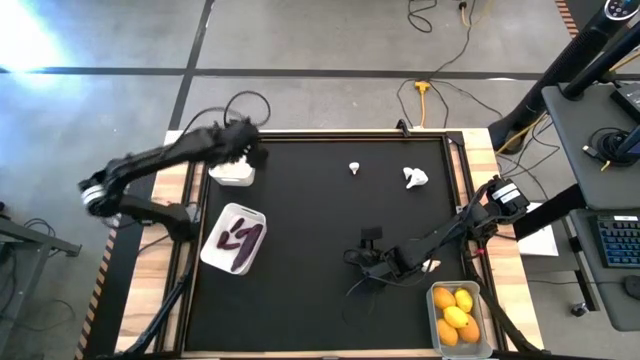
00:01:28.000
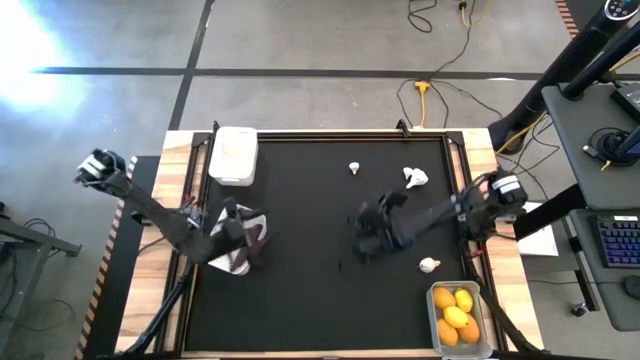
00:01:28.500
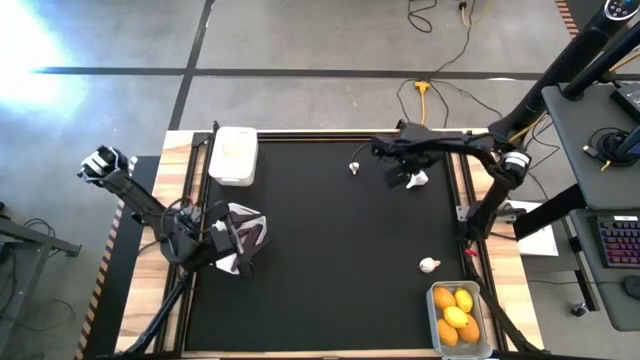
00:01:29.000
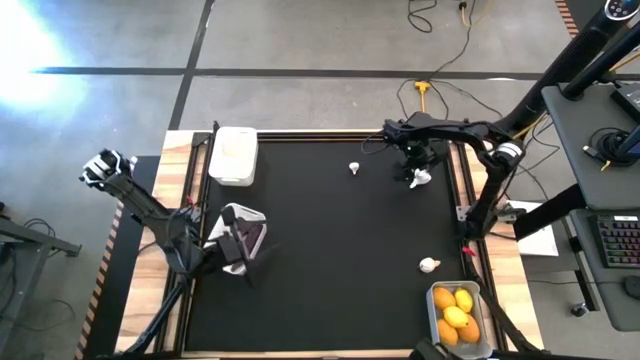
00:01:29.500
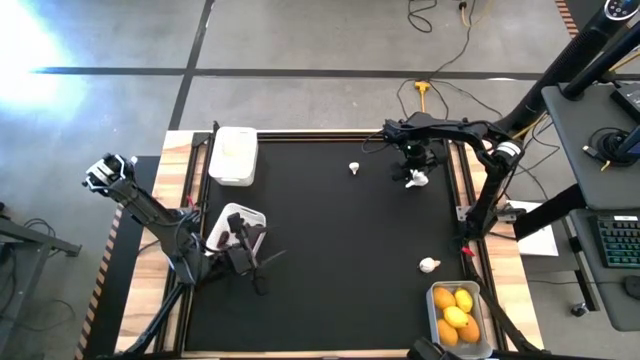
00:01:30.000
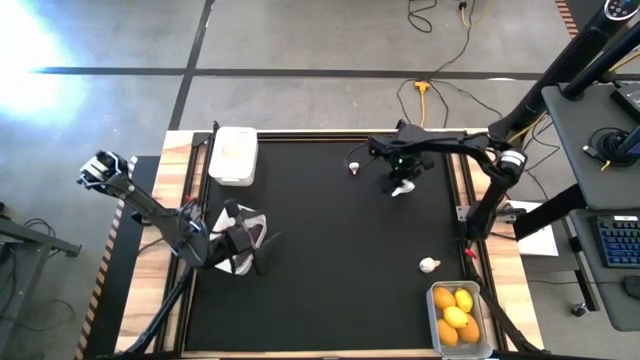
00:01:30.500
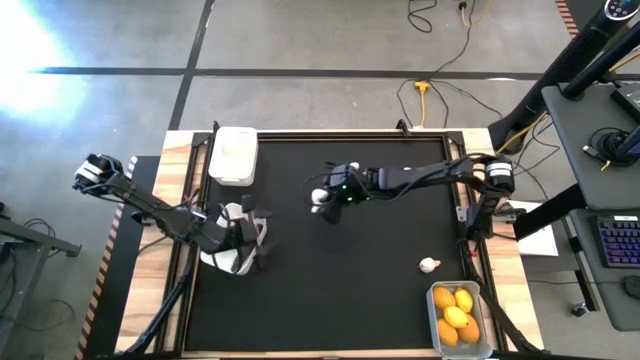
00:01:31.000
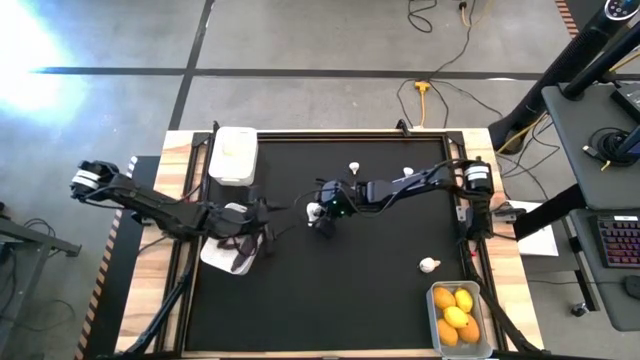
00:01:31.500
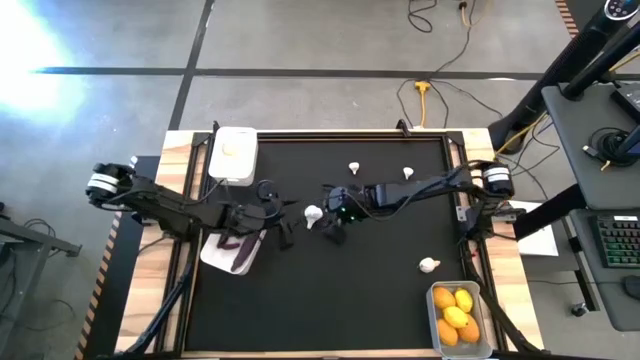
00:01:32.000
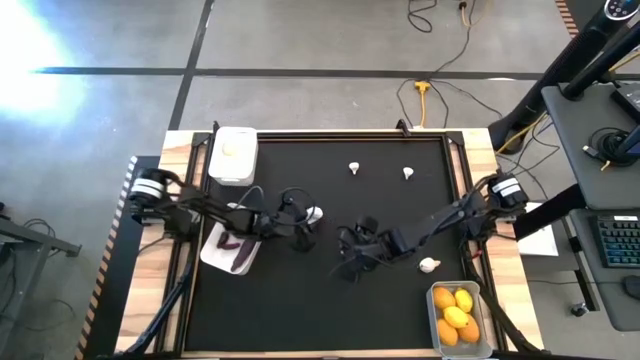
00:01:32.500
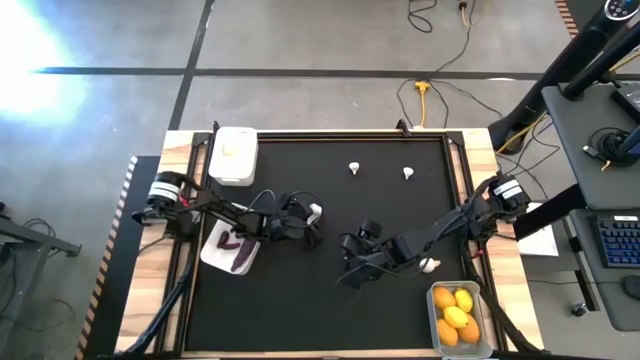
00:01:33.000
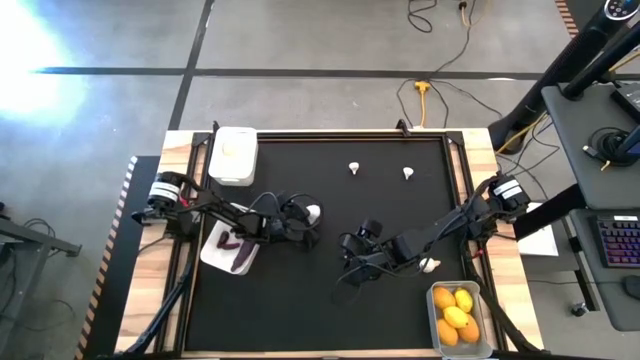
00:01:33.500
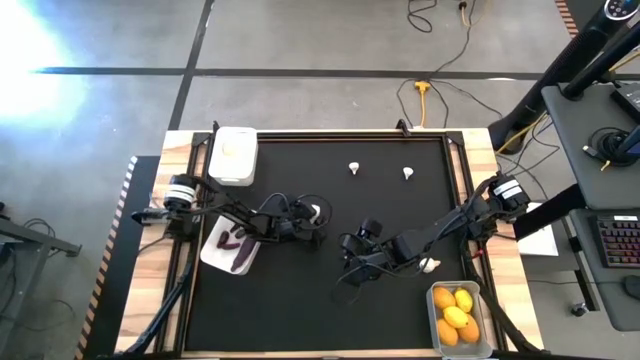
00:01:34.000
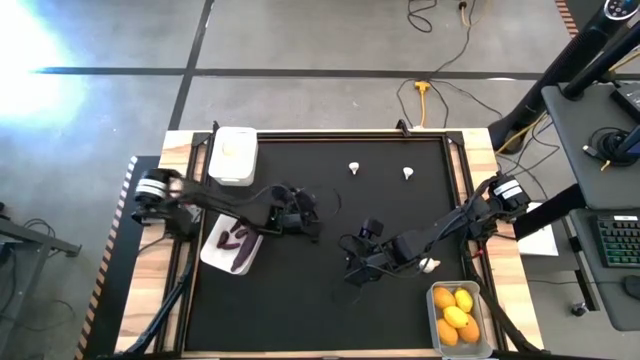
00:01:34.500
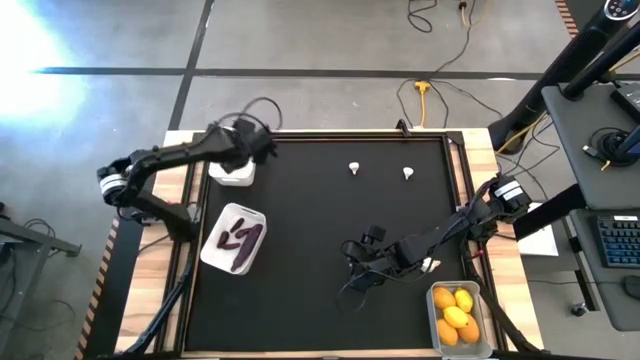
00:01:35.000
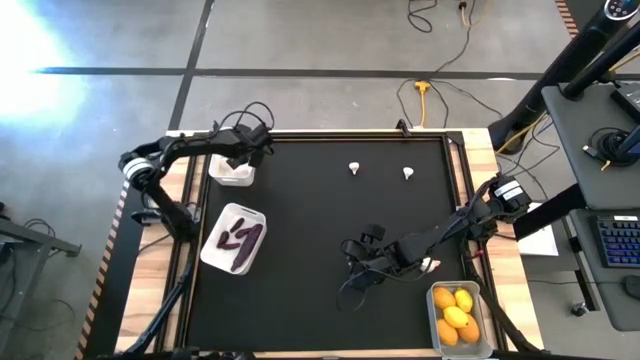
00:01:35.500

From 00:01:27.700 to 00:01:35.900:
Task: Sort produce into baskets
Put the garlic into the top white bin

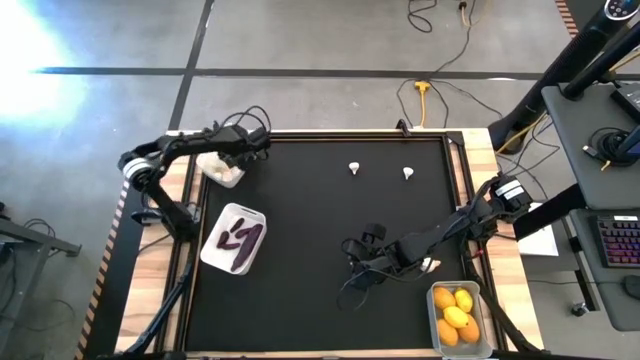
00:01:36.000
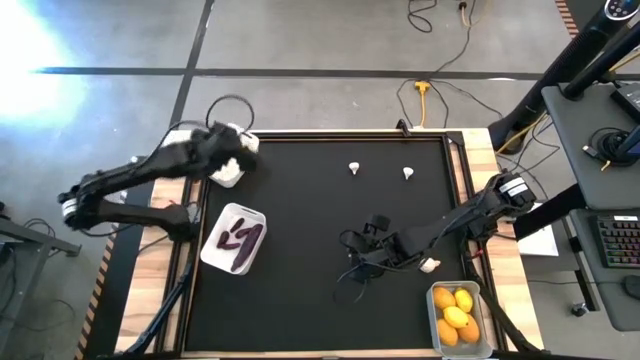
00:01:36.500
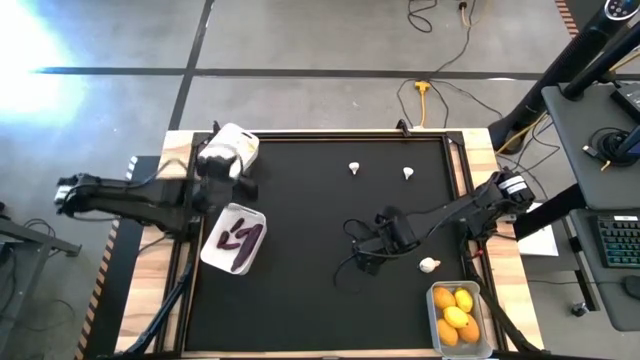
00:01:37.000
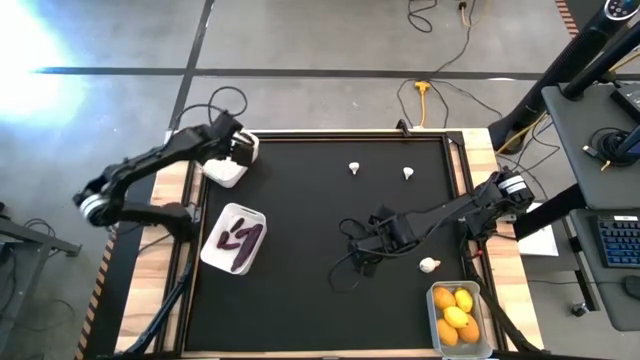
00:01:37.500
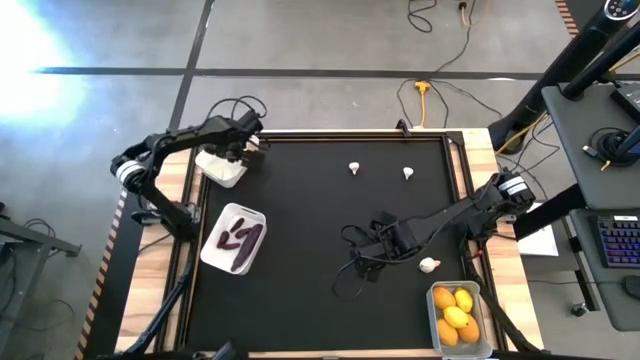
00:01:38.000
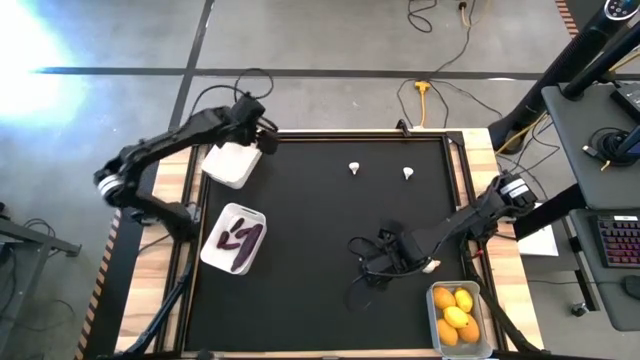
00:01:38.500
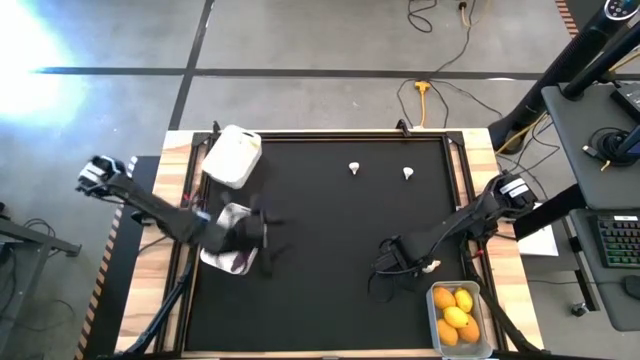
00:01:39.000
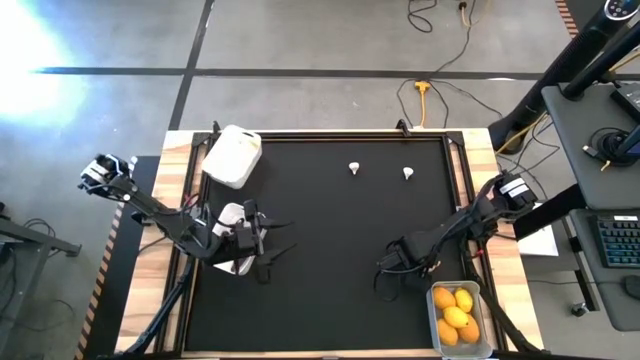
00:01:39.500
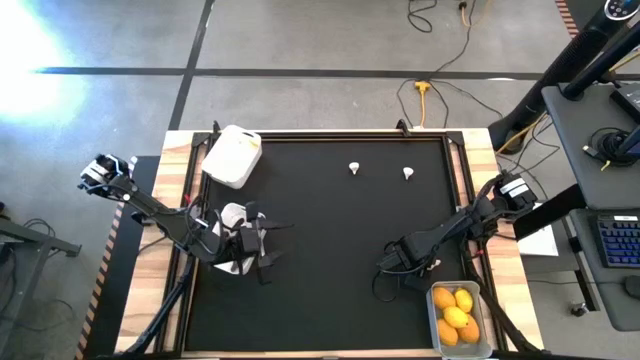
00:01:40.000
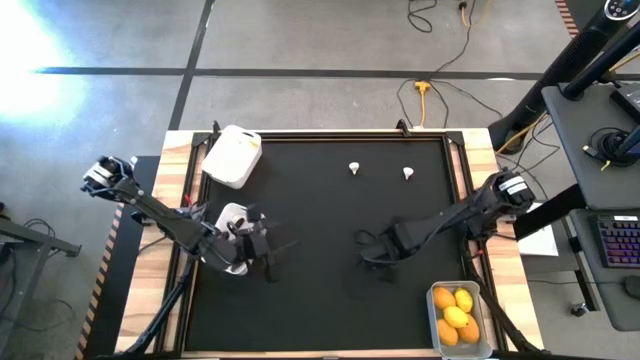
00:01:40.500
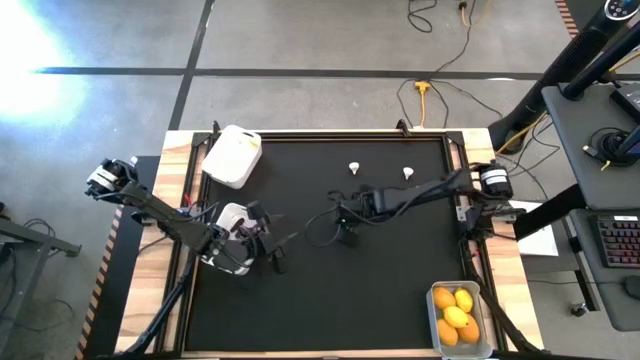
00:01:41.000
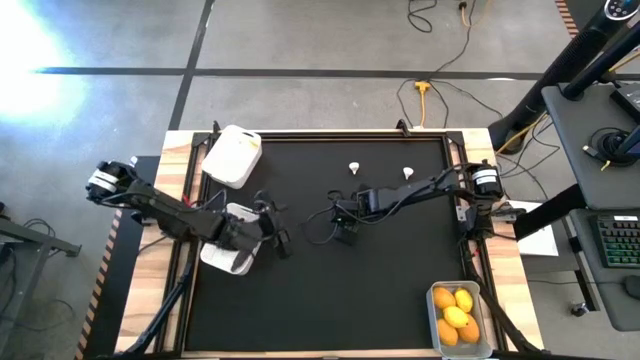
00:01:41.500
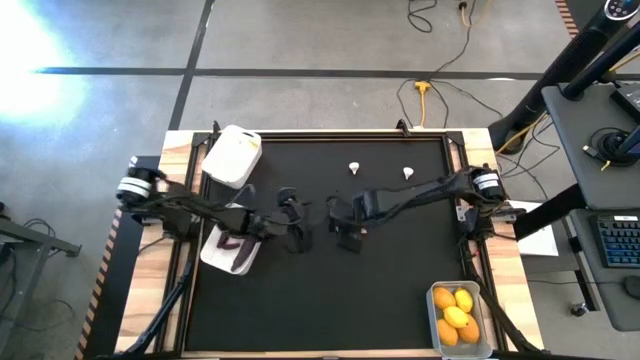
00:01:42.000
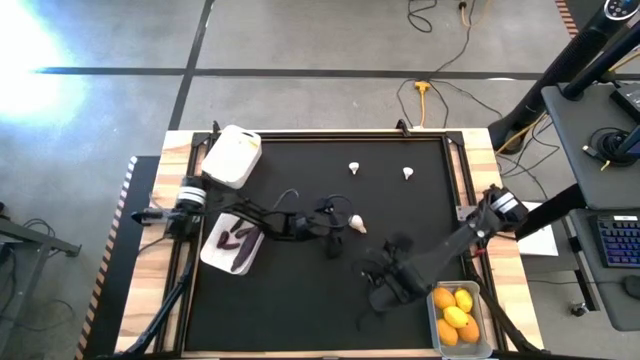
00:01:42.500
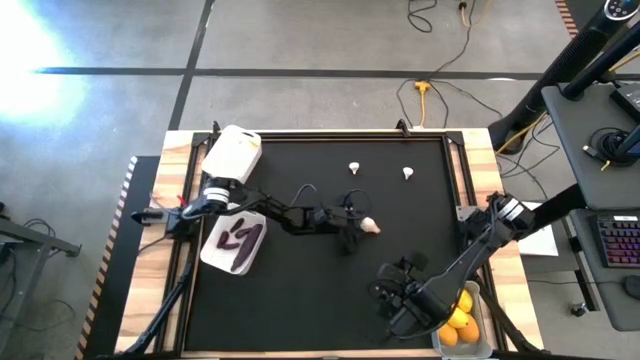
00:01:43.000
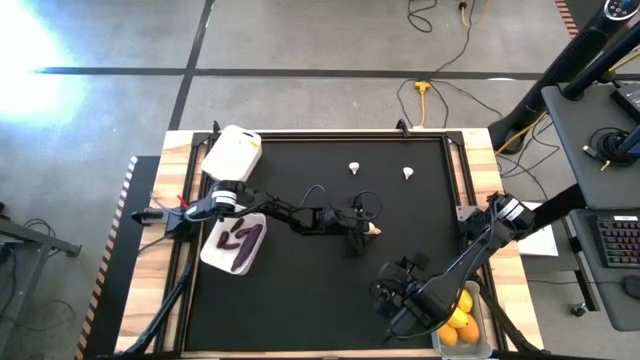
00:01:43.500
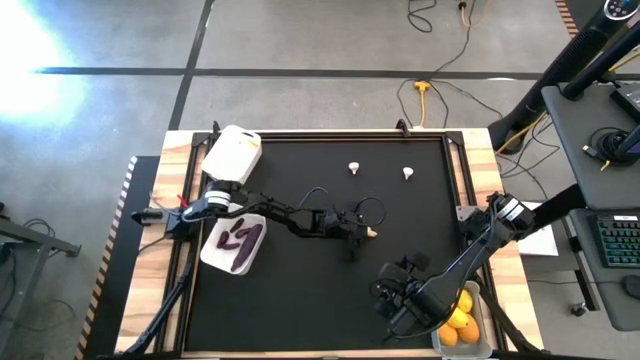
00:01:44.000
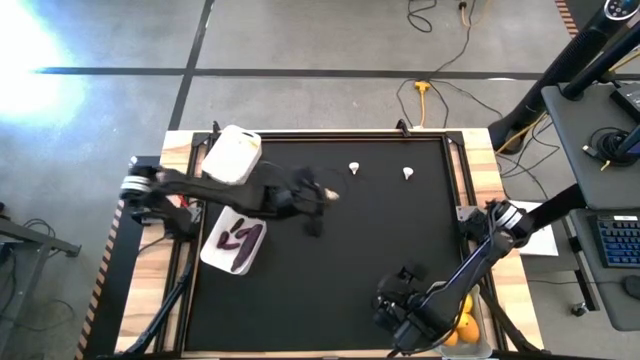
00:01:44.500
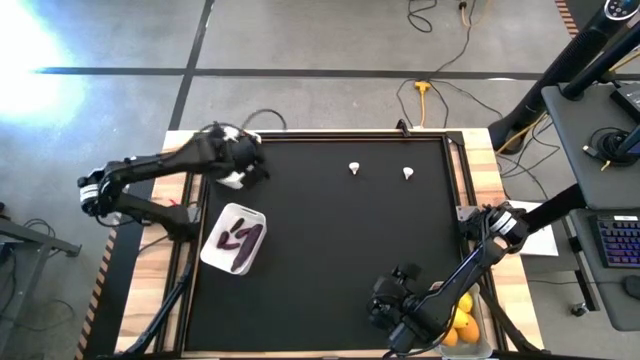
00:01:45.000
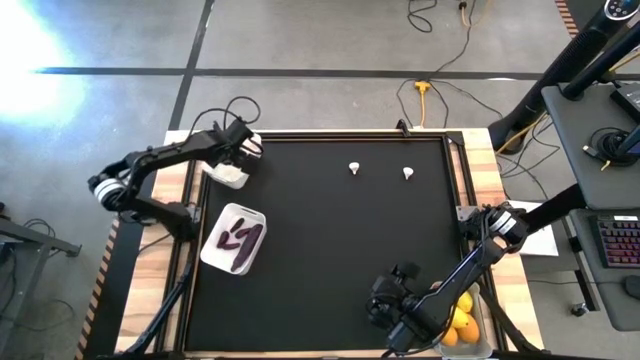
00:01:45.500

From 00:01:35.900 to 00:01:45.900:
Put the garlic into the top white bin

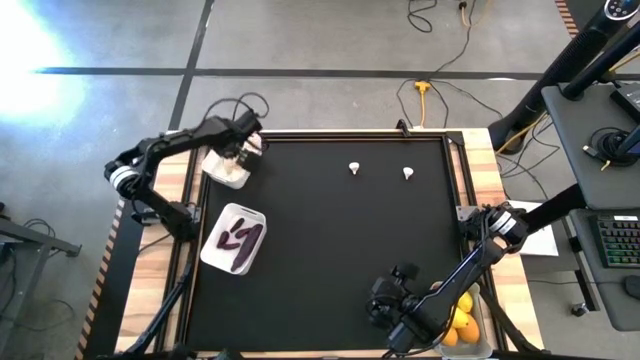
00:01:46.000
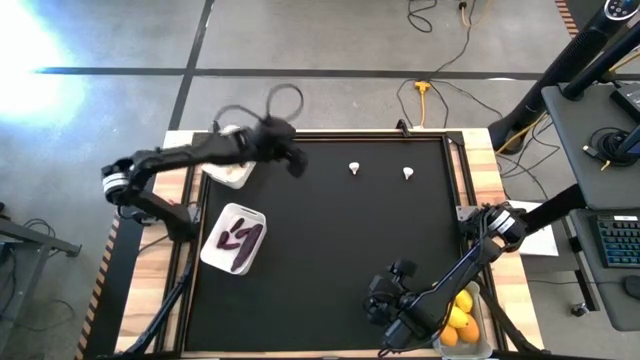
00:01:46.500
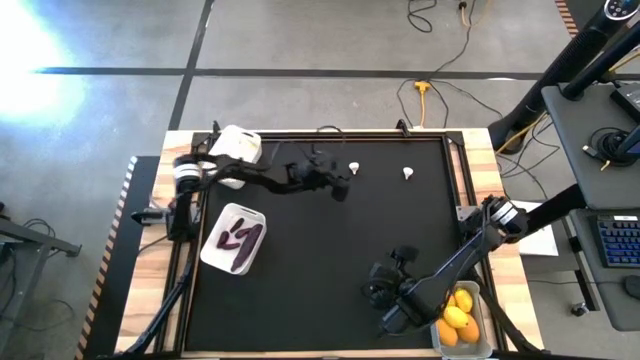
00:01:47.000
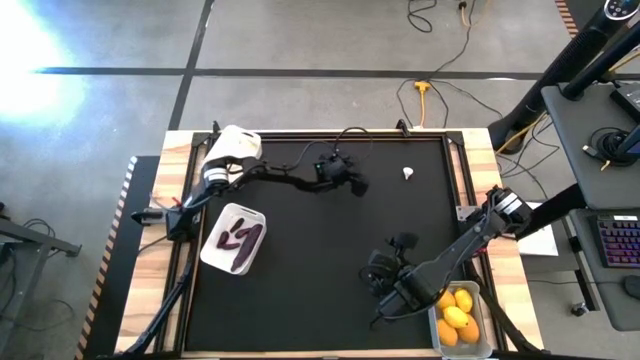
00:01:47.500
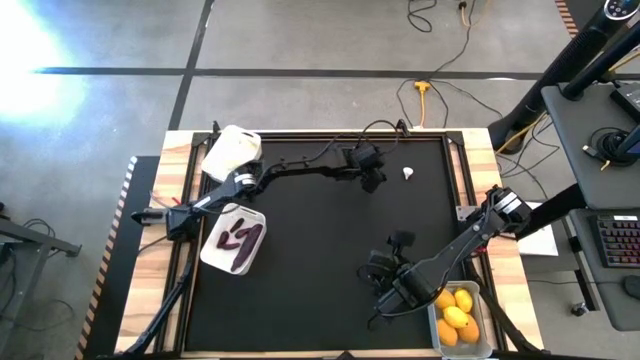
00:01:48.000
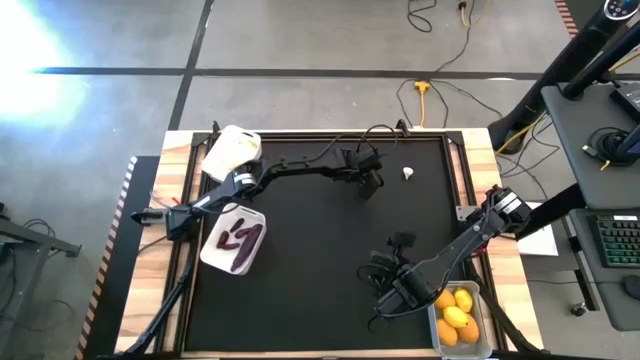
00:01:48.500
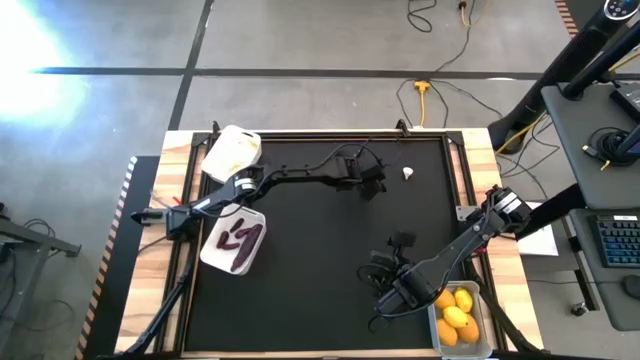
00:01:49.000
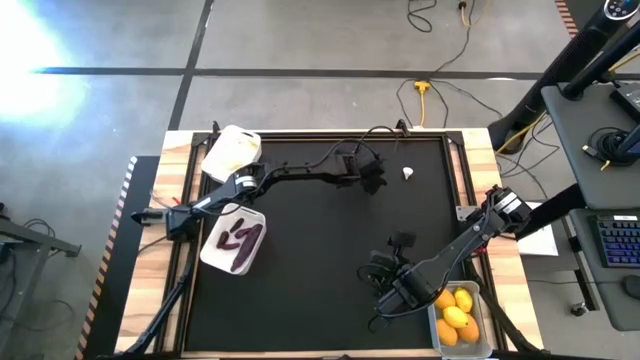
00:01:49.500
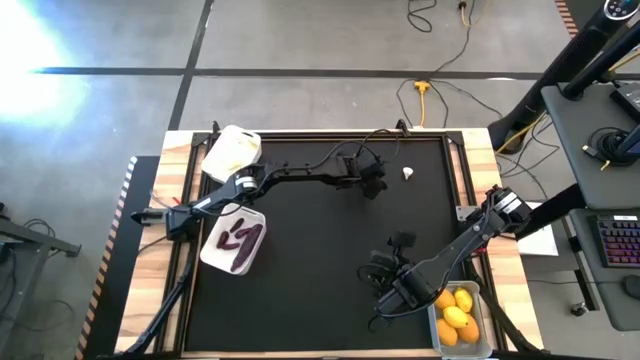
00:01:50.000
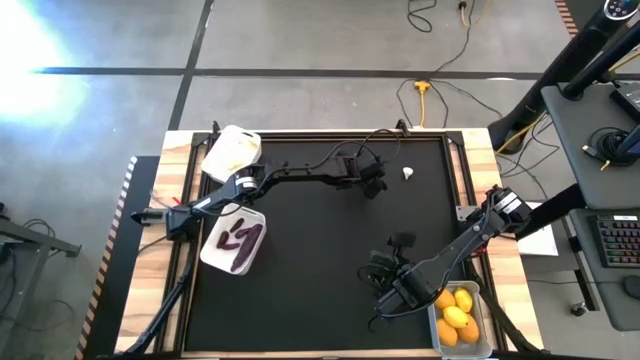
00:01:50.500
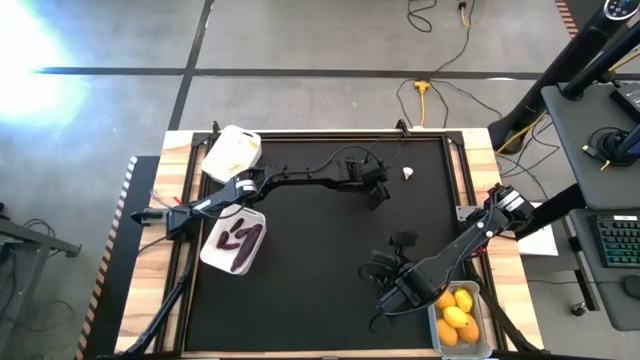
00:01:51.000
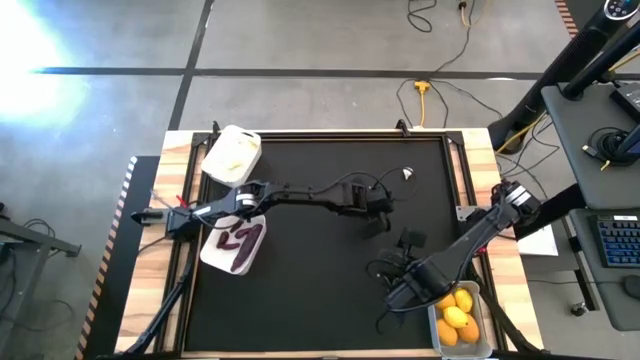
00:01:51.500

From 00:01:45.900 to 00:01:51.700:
Put the garlic into the top white bin
